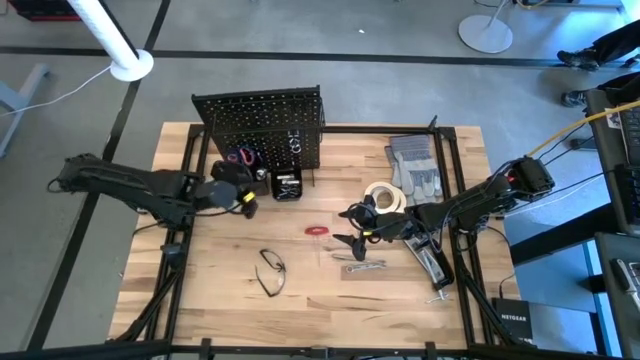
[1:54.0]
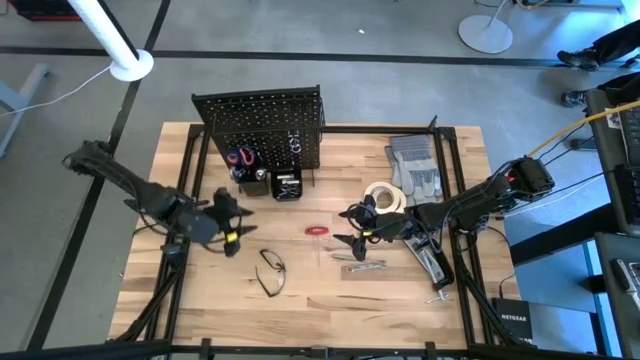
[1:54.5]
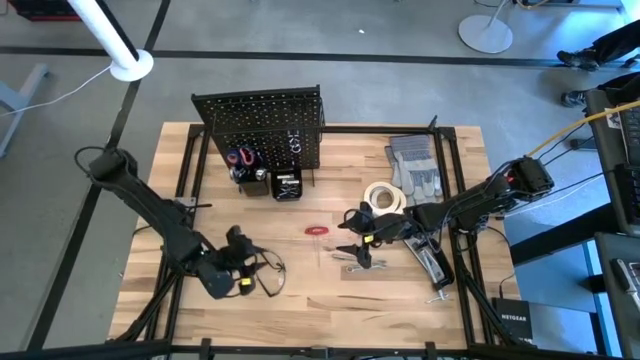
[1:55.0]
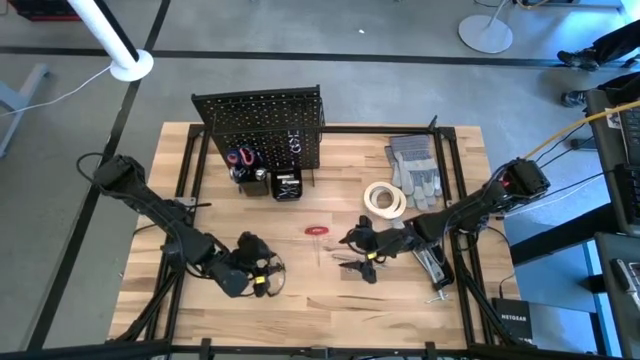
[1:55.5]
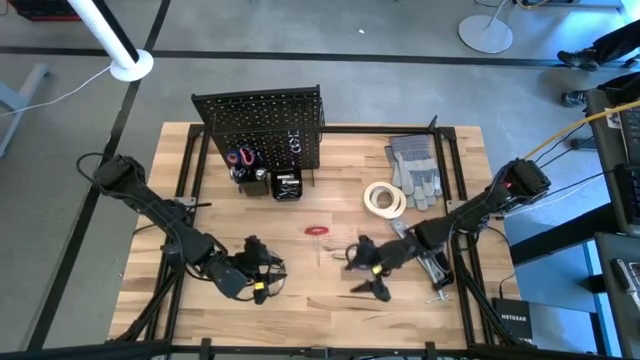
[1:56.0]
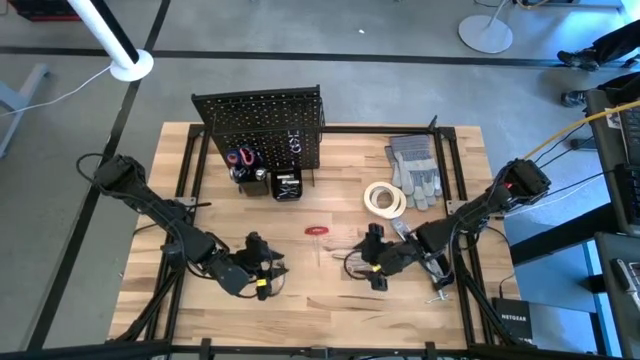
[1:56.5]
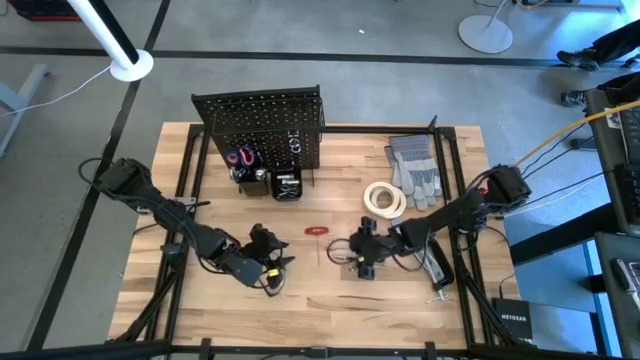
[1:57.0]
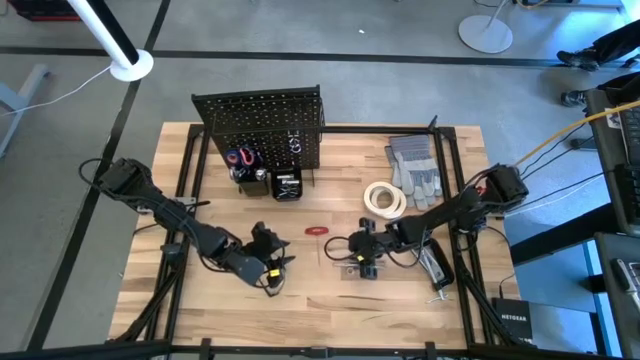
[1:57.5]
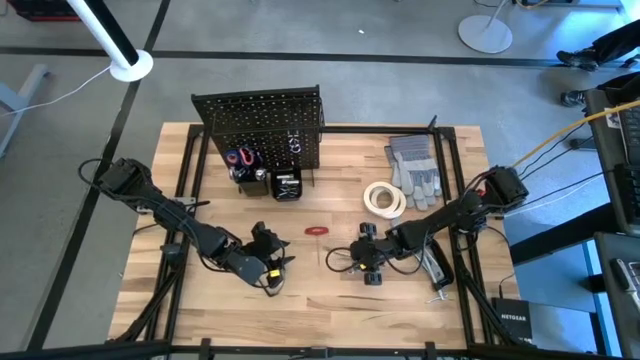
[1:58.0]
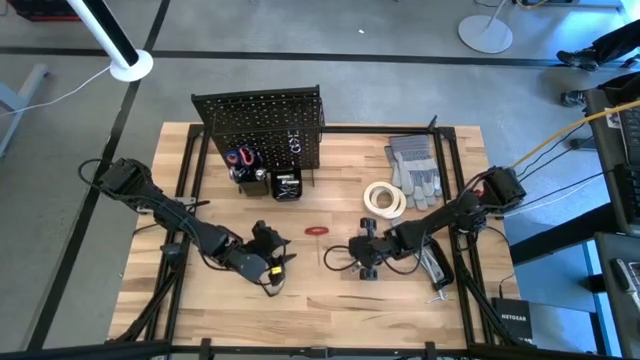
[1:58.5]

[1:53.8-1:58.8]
Task: Hang tools onto peg board
Put the fork tube into the left pegboard organizer bin

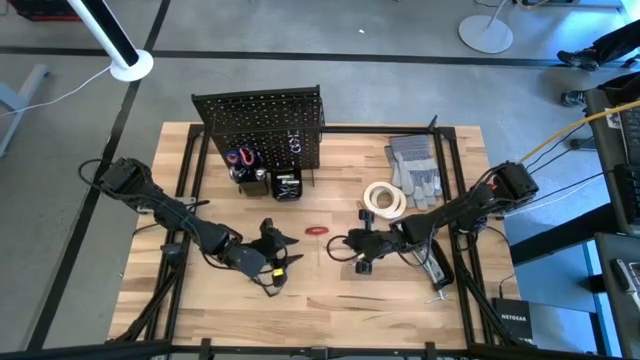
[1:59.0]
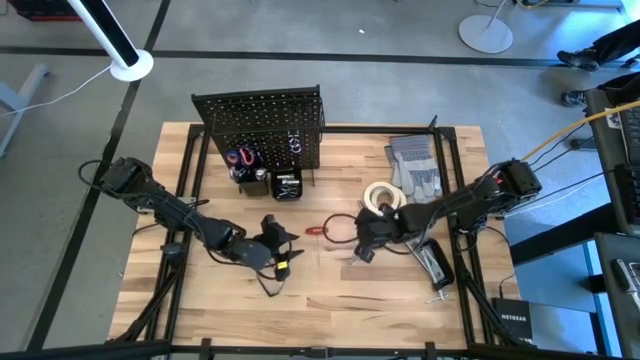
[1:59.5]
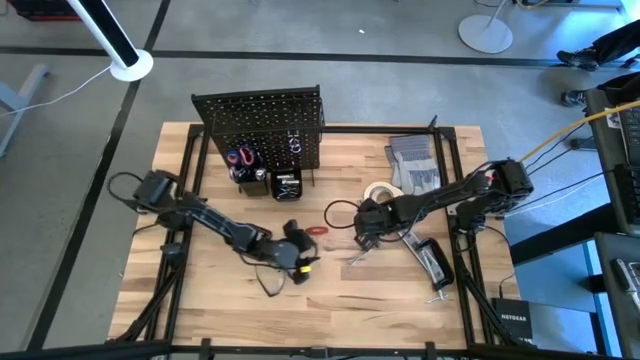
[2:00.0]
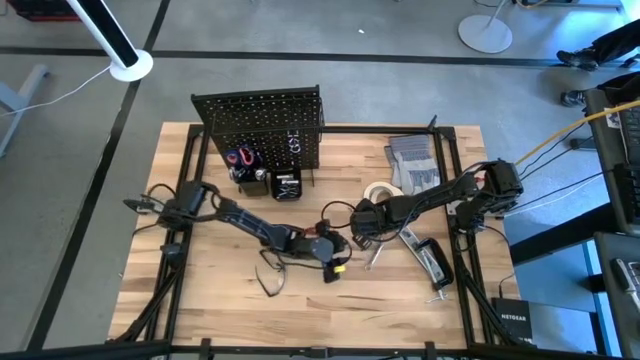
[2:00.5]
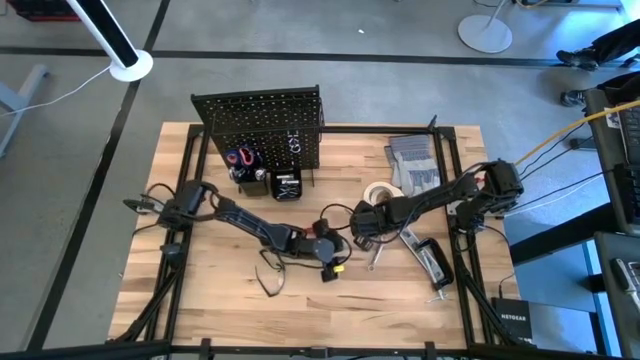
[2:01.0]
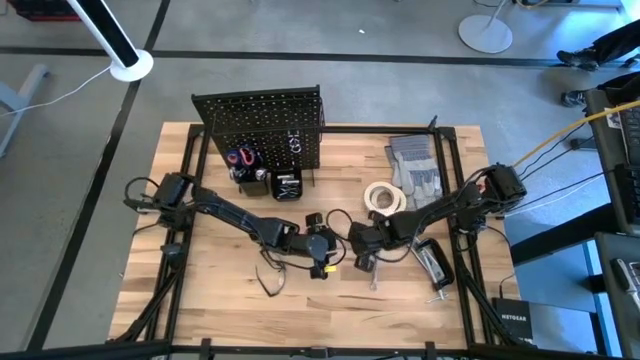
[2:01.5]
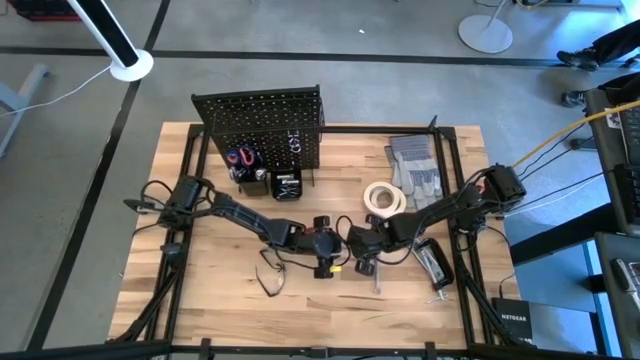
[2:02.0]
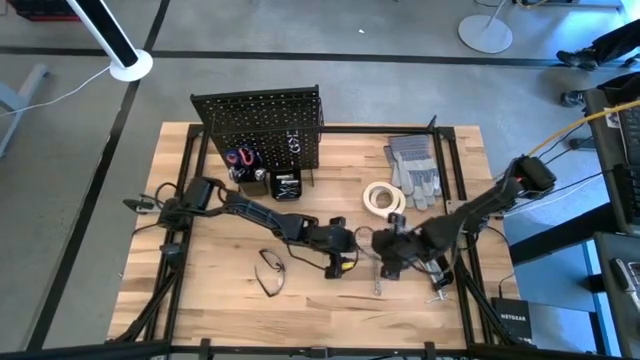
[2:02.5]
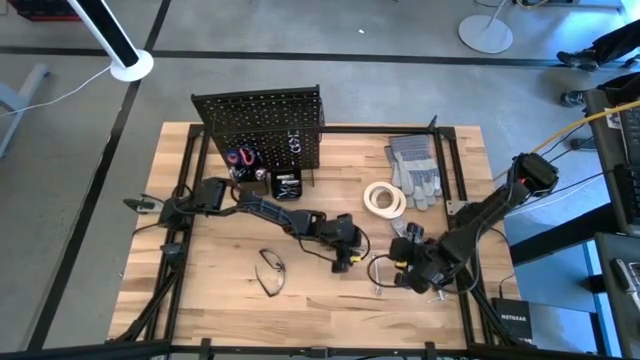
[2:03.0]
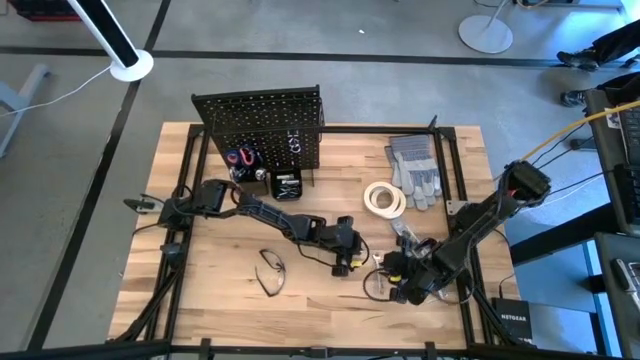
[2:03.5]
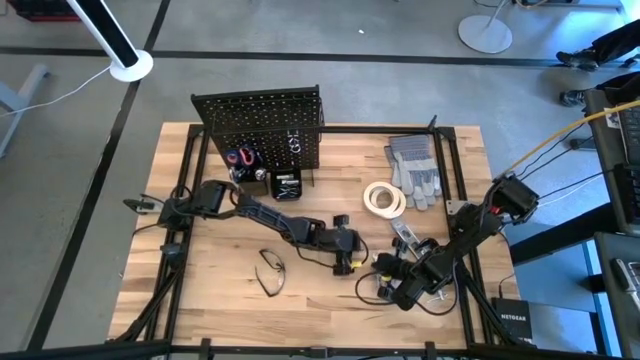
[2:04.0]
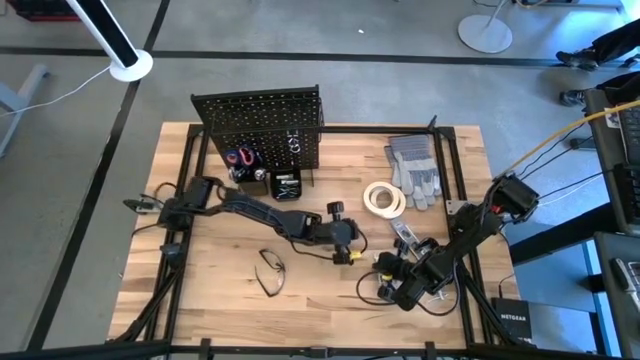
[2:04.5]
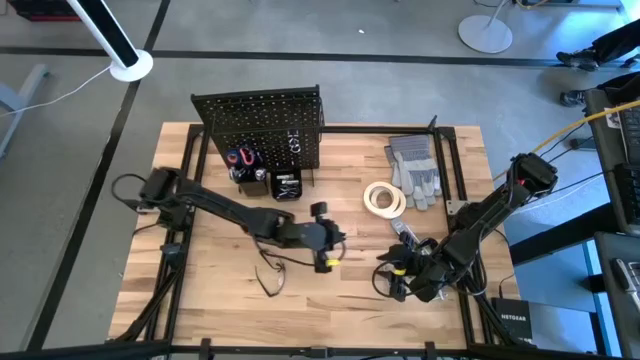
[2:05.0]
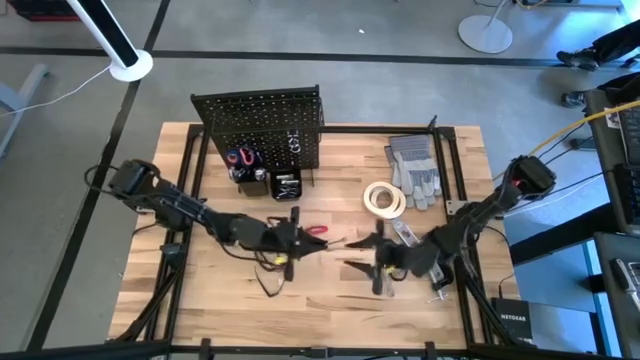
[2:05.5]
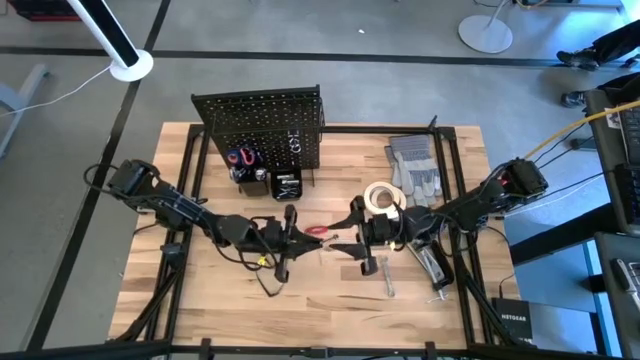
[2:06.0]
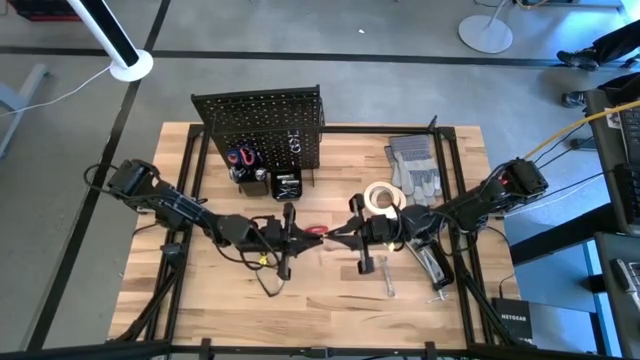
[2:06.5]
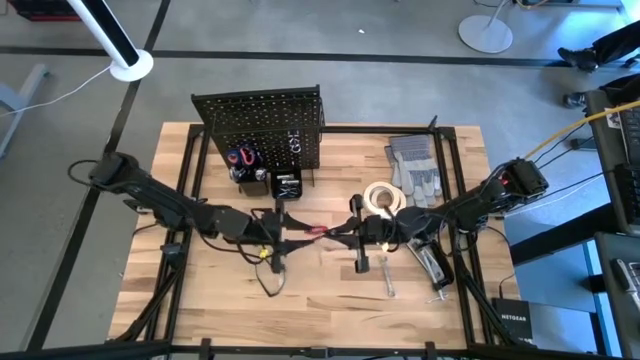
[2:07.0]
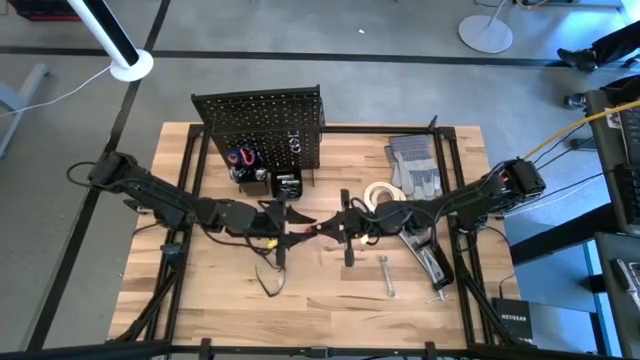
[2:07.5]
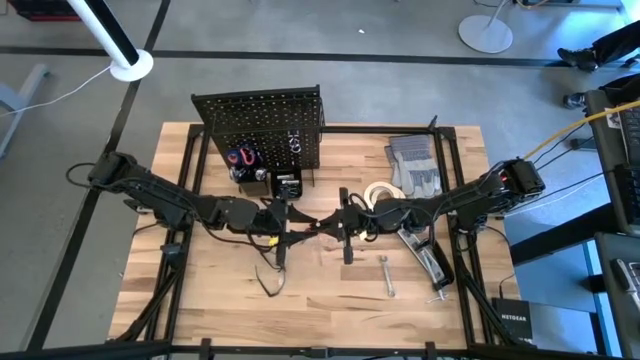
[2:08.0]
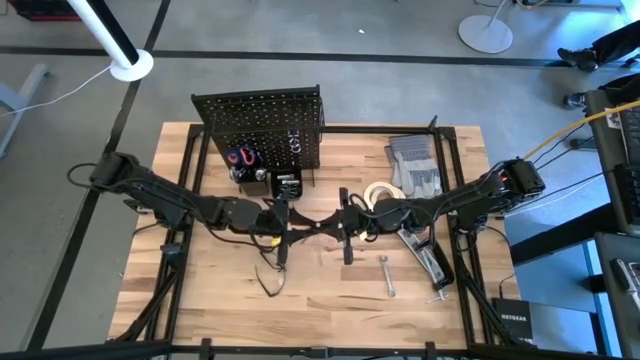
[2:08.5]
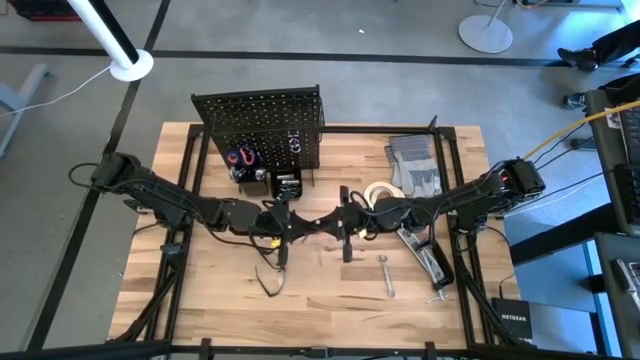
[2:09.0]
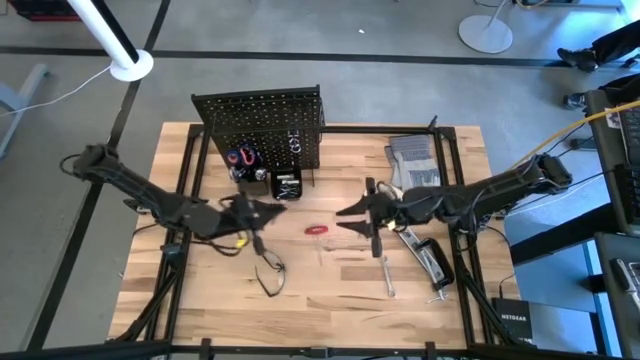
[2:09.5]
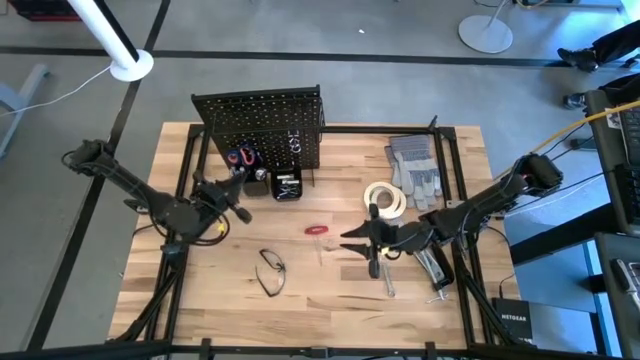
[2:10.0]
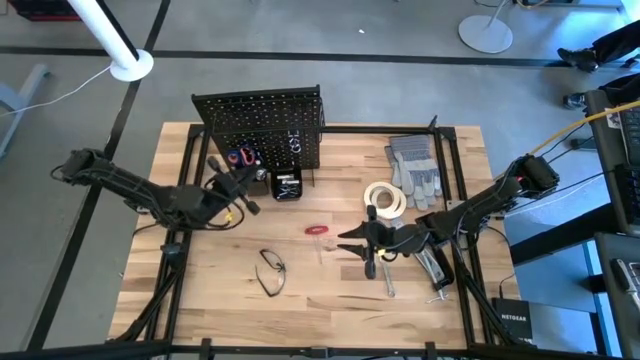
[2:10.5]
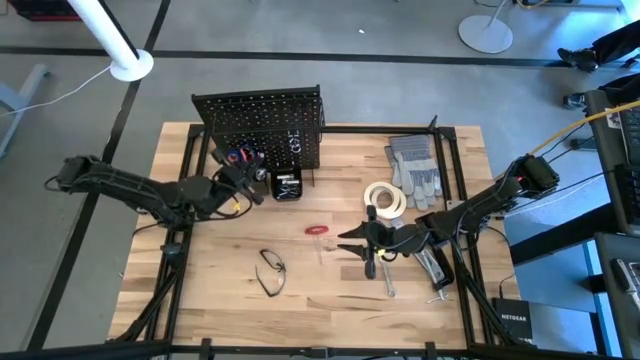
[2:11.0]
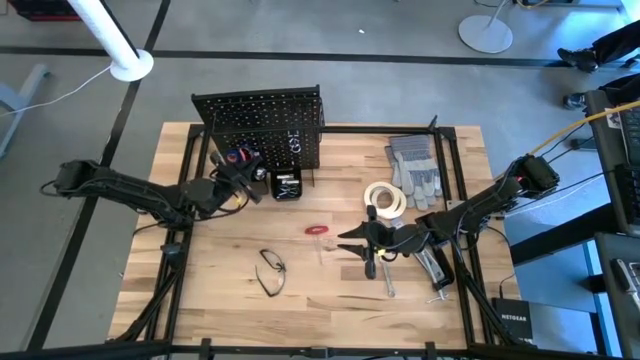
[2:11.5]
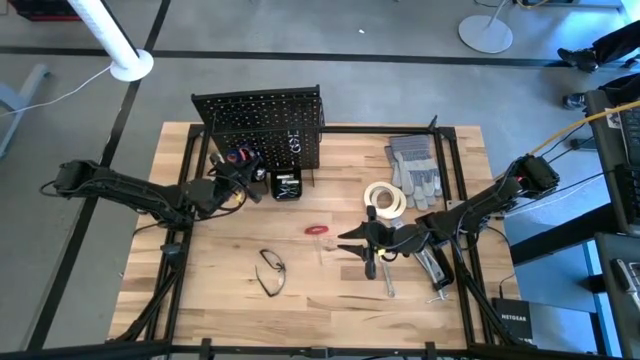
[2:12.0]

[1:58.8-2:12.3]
Put the fork tube into the left pegboard organizer bin

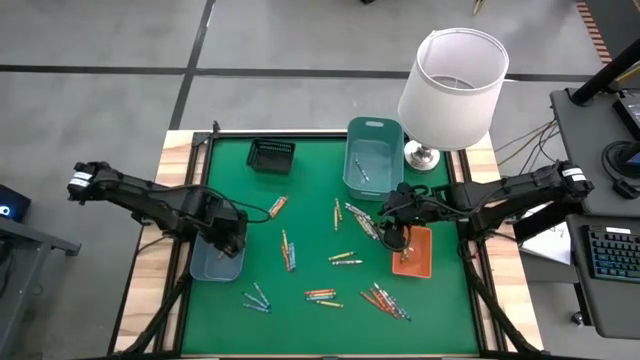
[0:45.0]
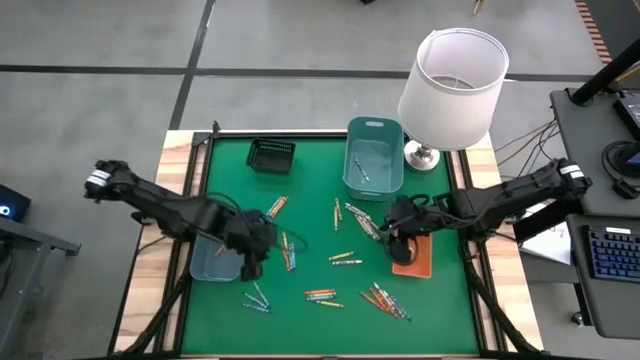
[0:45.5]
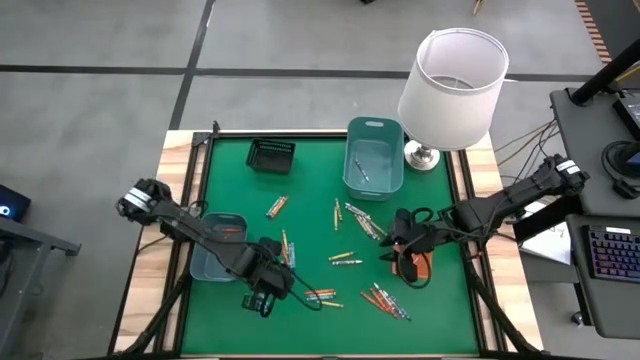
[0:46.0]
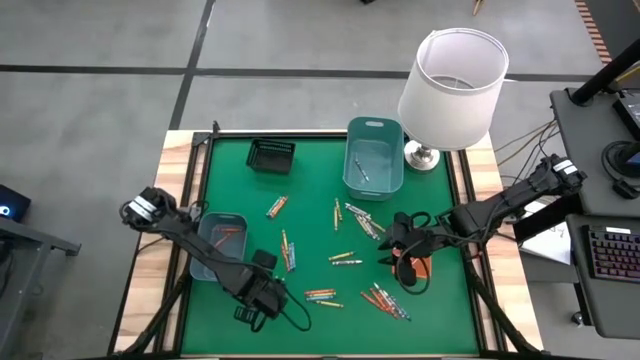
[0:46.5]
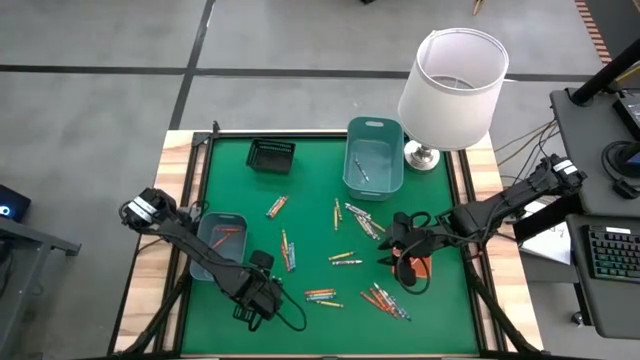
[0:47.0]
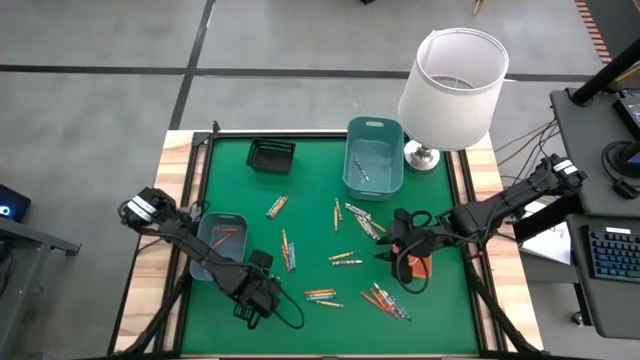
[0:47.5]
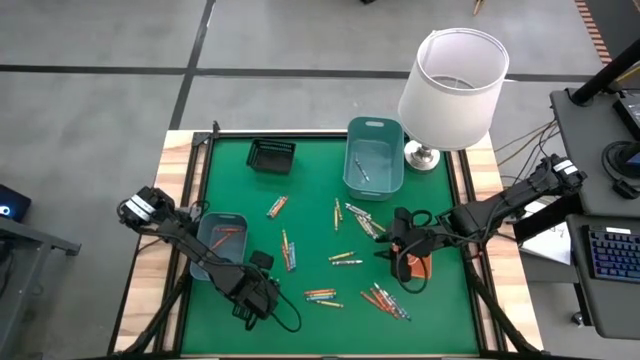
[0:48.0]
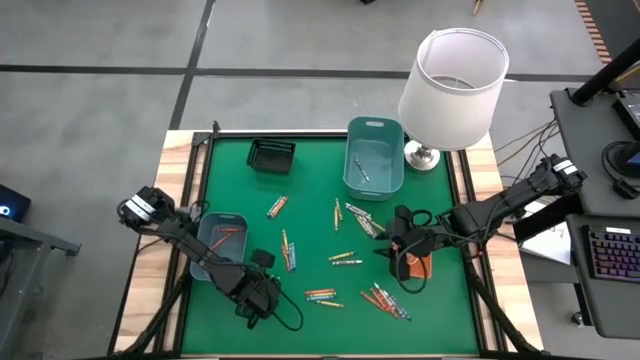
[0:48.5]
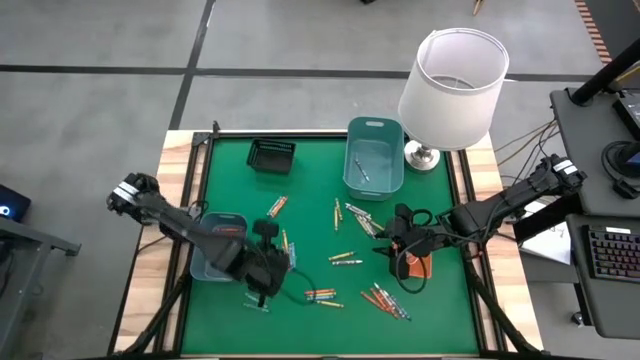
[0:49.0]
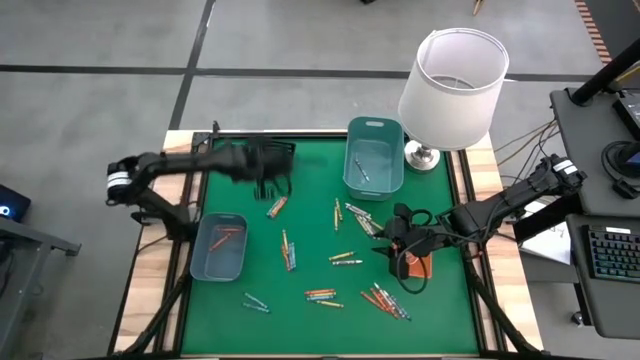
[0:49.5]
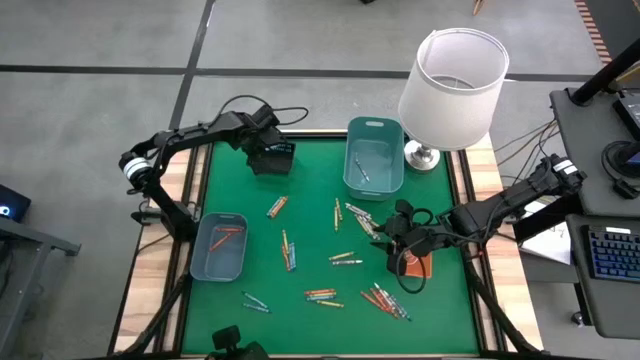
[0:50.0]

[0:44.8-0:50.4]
Task: Sort crayons
Put the blue crayon into the black bin
